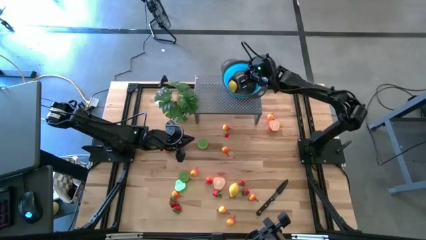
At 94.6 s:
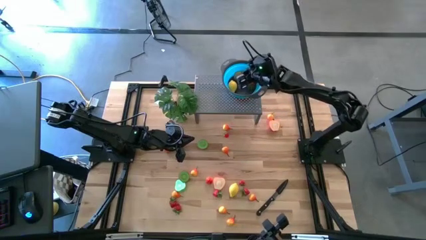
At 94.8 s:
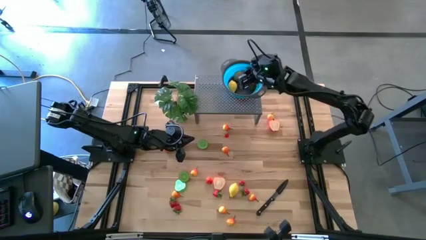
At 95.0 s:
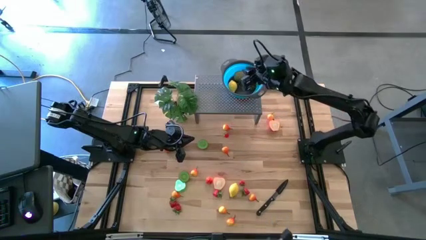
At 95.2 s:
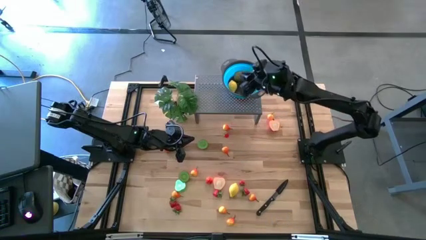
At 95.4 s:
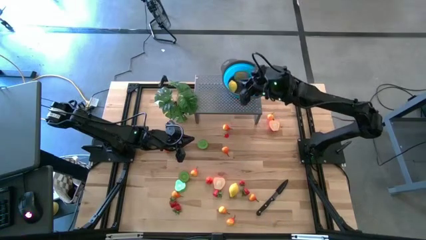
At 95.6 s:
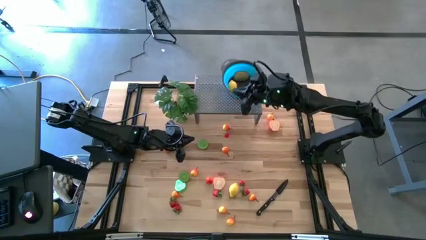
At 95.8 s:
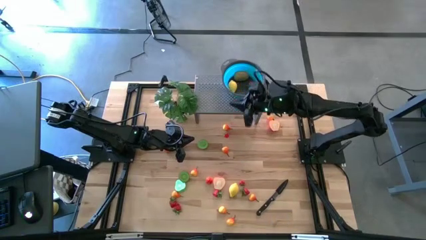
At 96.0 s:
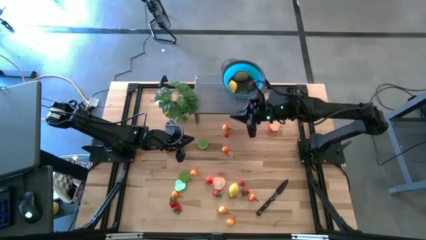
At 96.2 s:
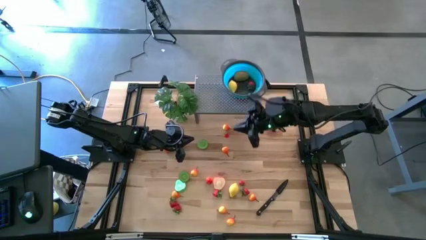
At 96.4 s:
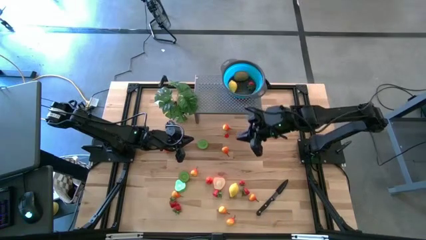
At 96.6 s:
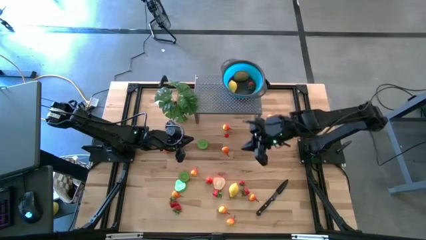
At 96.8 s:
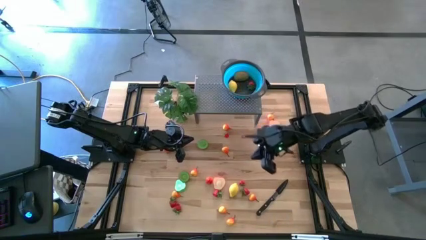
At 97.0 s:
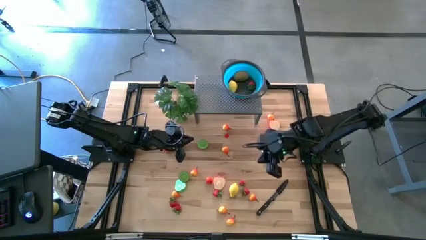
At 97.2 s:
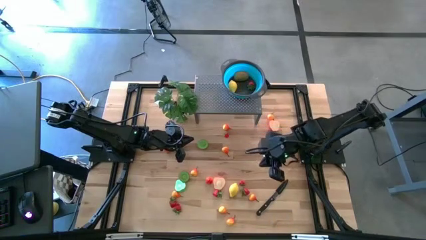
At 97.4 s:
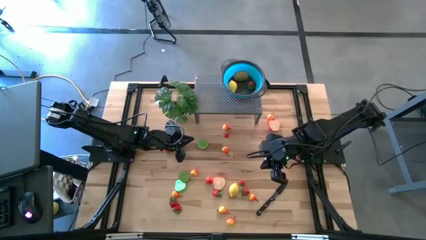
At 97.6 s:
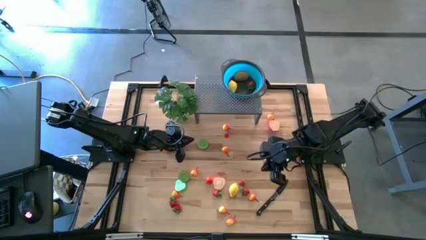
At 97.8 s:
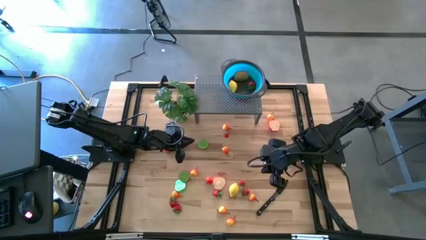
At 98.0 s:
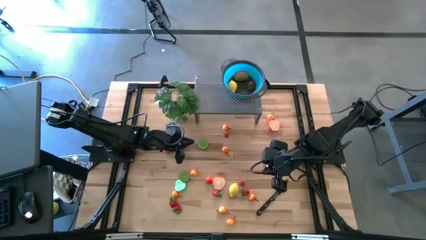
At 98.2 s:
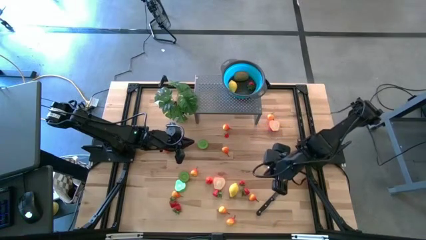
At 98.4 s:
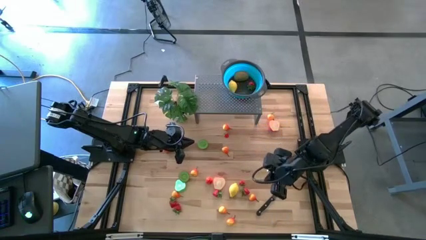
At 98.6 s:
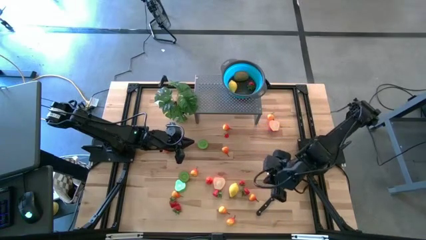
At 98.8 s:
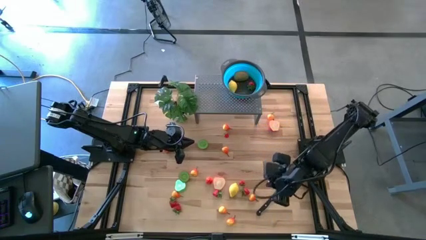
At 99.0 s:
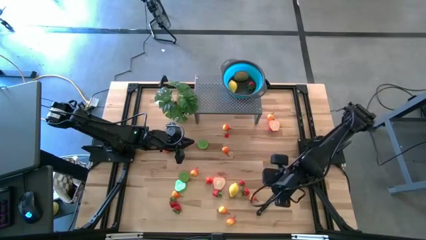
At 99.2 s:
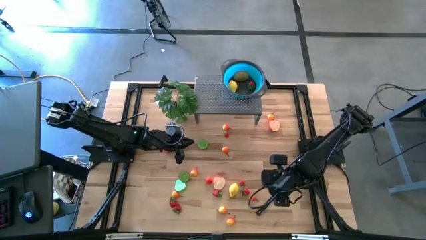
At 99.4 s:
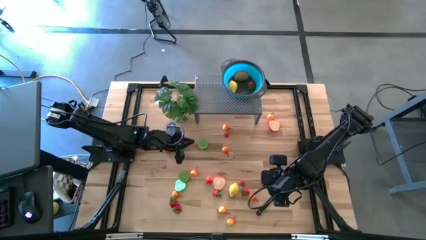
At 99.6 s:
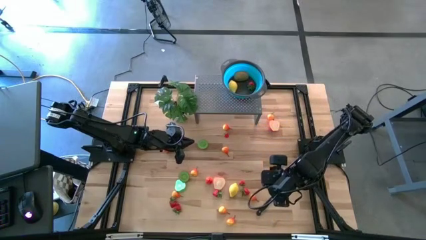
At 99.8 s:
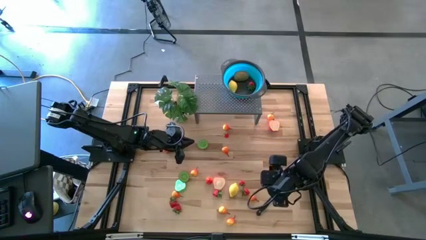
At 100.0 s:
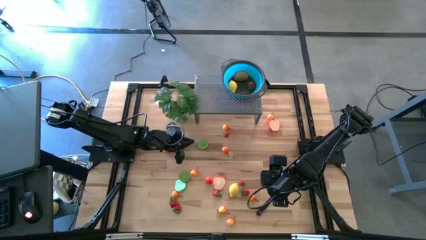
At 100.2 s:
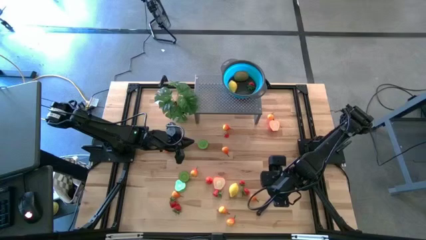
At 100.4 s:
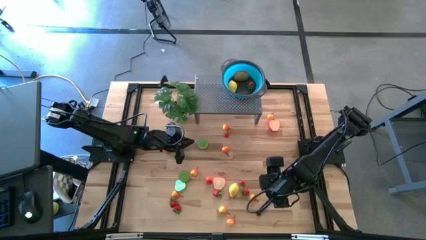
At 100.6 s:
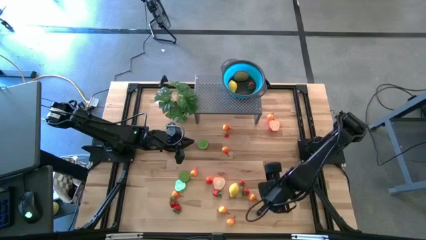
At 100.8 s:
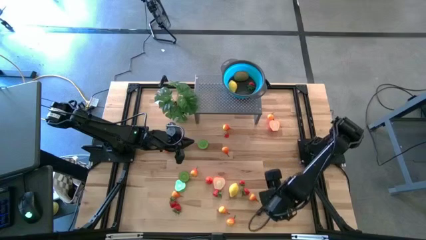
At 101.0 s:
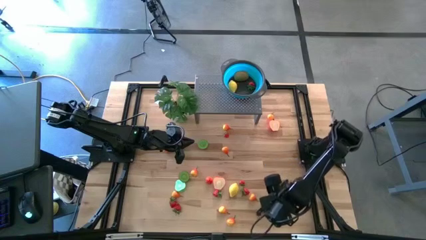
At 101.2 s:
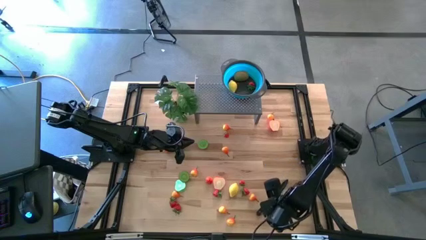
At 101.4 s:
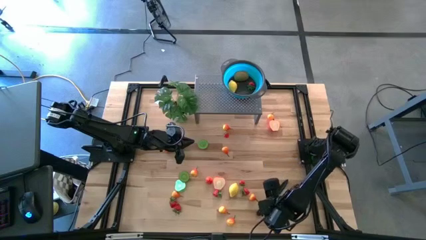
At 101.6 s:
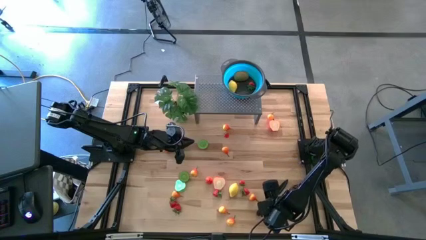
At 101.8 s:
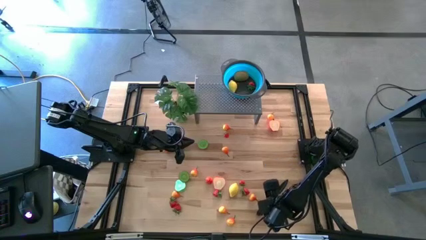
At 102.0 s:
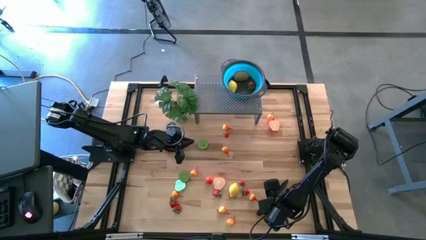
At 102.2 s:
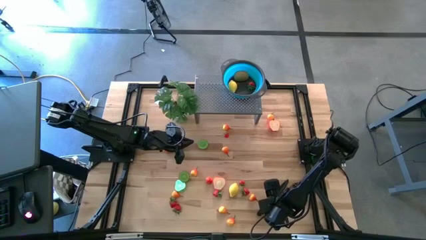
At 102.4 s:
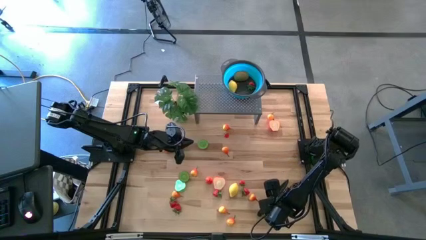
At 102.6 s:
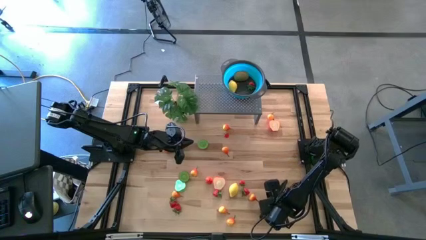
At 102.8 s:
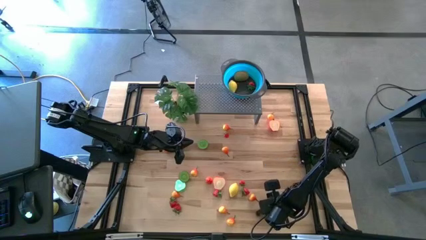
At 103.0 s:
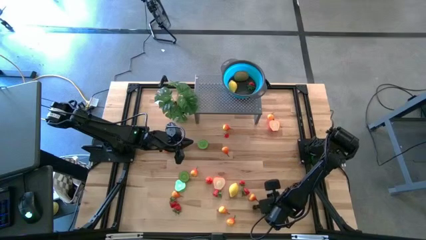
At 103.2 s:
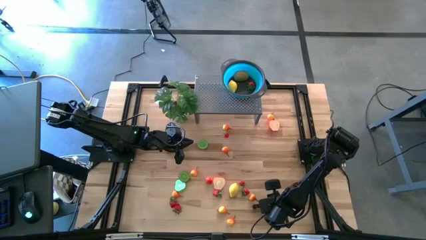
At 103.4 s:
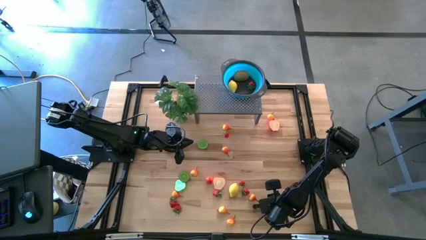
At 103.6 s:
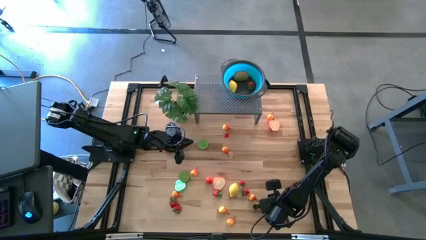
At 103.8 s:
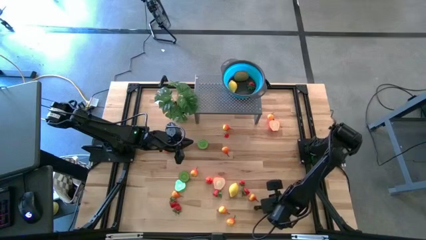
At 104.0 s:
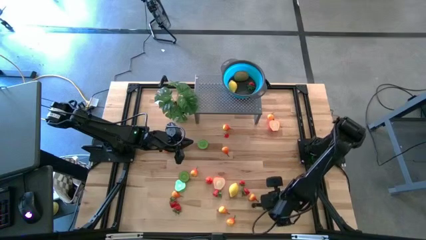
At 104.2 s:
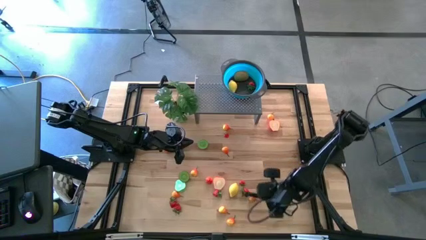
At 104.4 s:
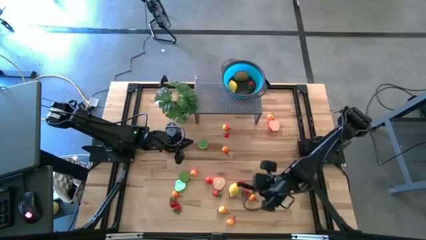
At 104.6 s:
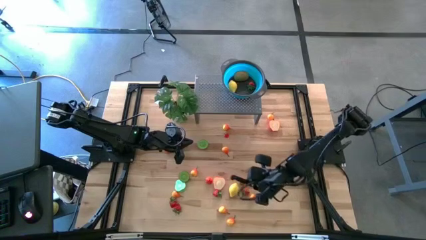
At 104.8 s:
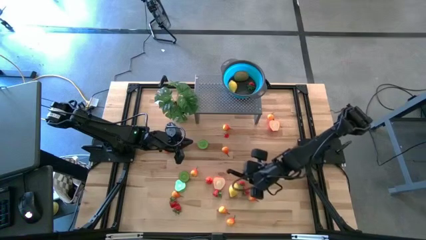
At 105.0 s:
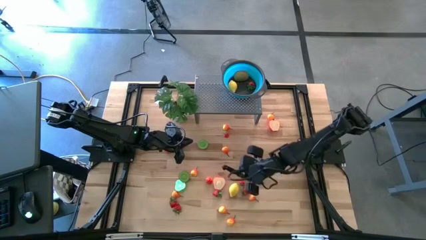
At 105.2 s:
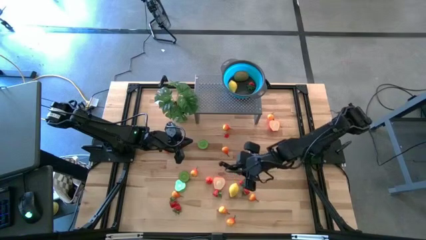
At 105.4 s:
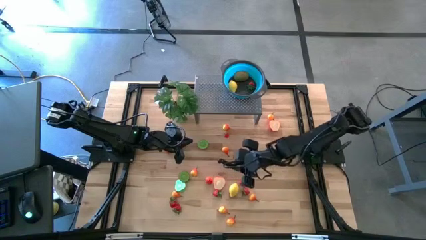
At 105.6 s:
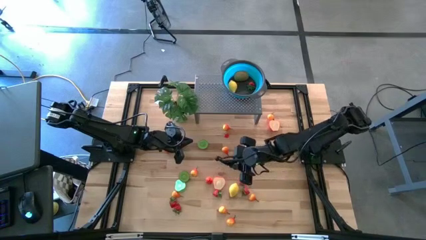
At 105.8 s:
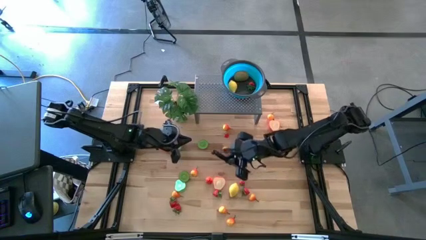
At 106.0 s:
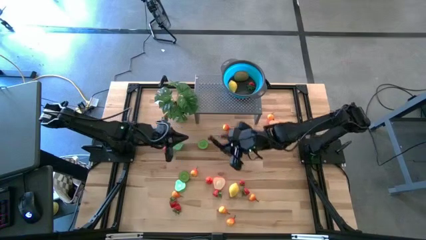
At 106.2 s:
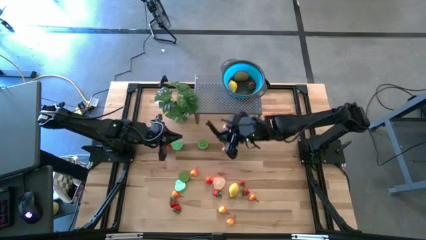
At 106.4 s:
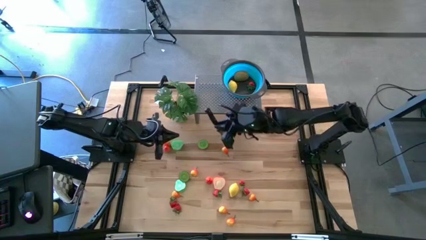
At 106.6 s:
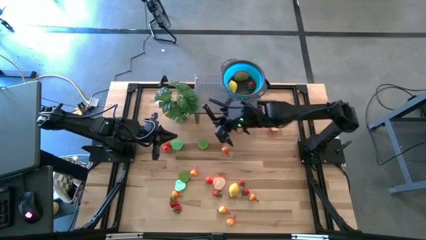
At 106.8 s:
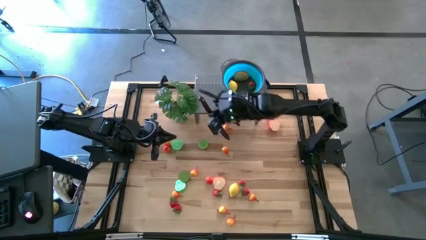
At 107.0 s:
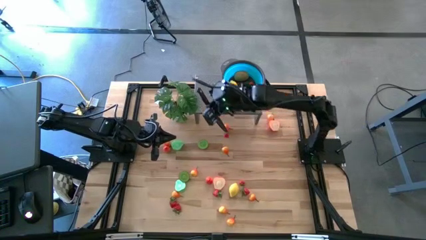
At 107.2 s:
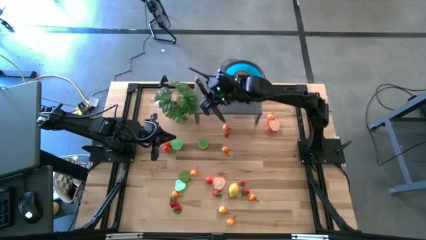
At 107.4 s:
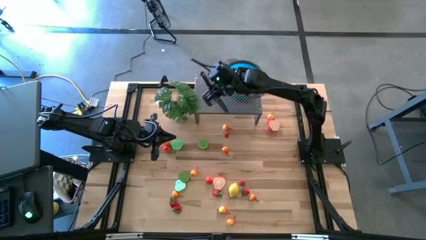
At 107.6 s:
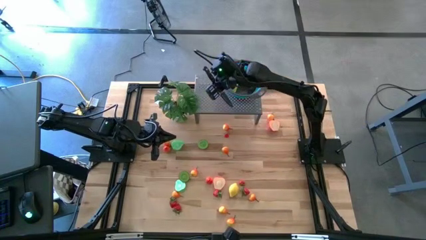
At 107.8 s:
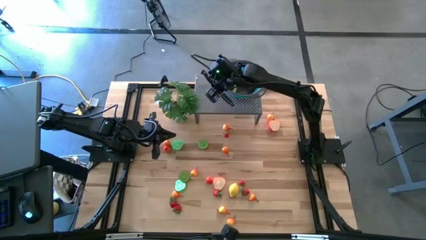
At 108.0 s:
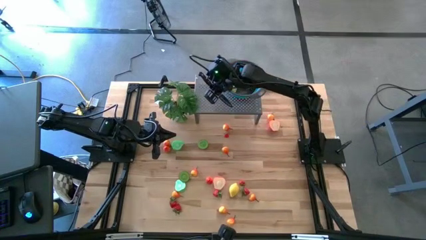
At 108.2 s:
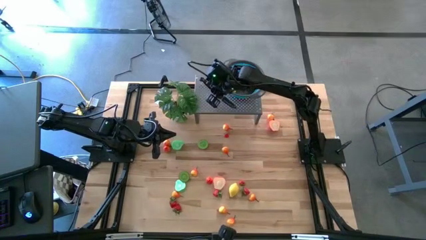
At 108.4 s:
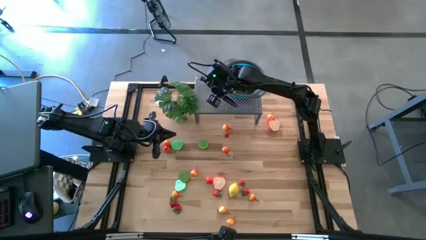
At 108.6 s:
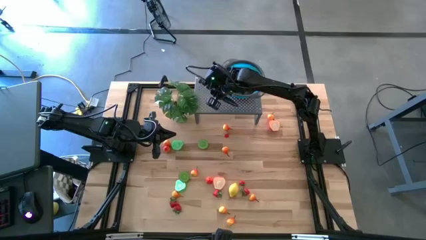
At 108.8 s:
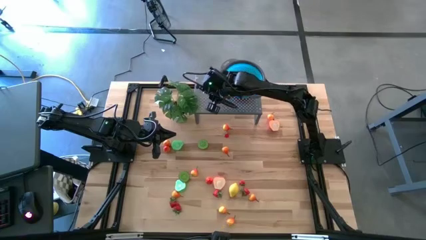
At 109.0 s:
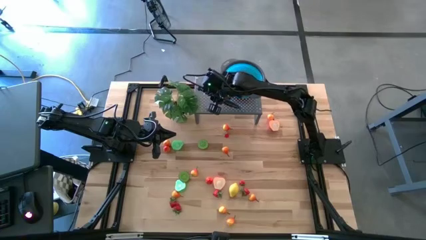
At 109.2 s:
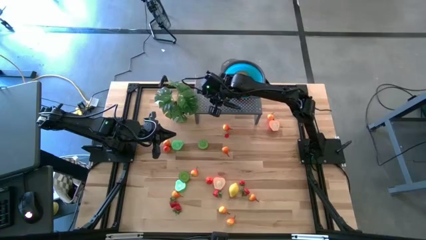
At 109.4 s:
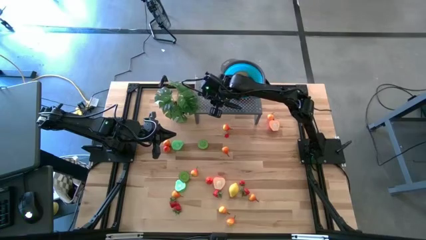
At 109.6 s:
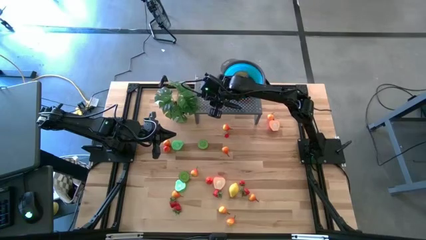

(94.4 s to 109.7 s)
Task: Pick & Place Fruit
Put the black knife on the shelf

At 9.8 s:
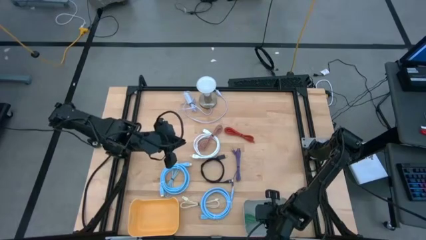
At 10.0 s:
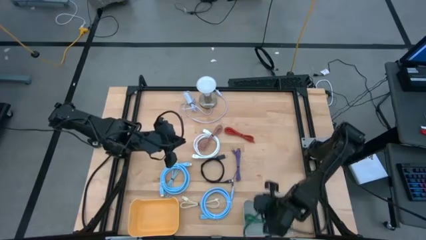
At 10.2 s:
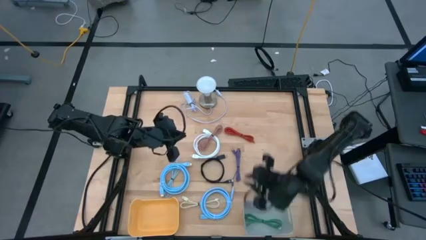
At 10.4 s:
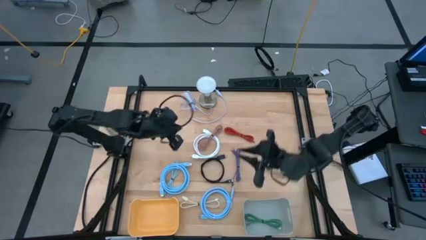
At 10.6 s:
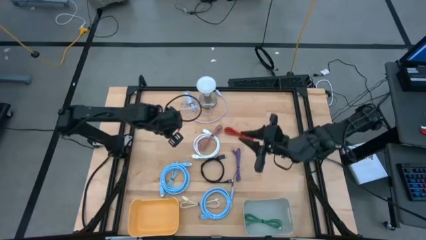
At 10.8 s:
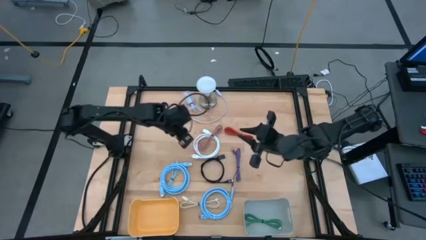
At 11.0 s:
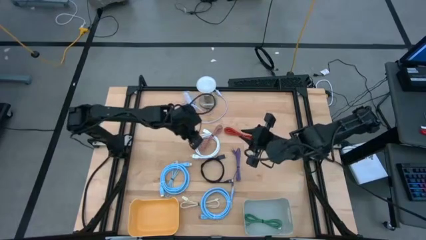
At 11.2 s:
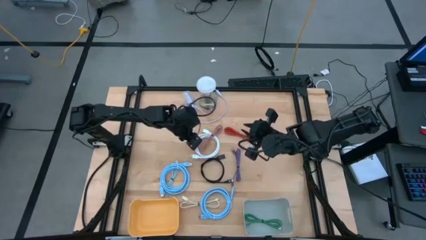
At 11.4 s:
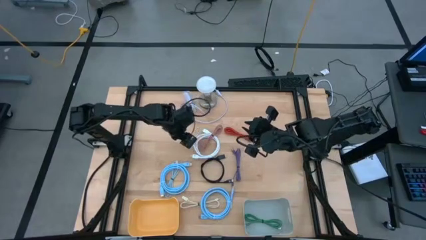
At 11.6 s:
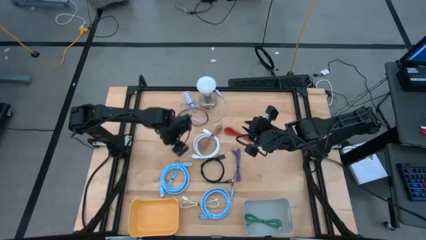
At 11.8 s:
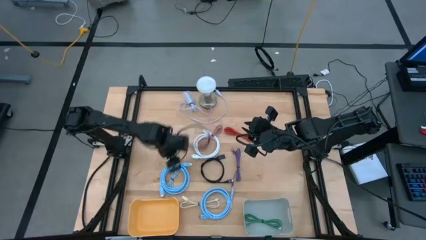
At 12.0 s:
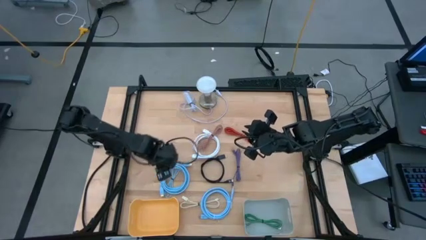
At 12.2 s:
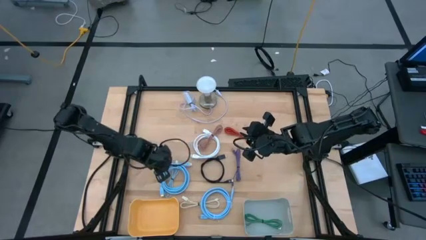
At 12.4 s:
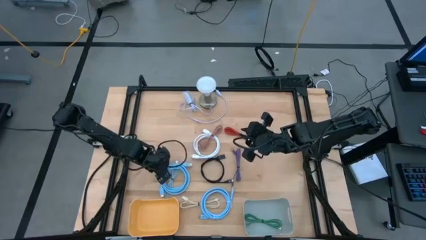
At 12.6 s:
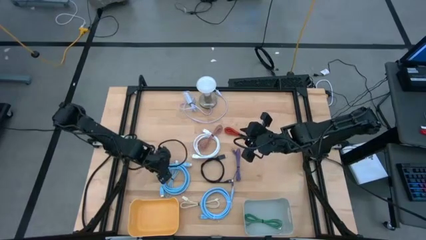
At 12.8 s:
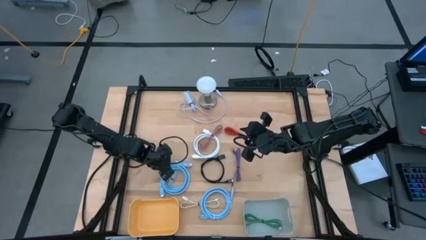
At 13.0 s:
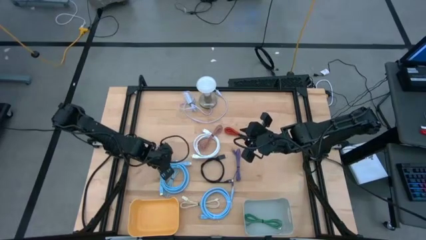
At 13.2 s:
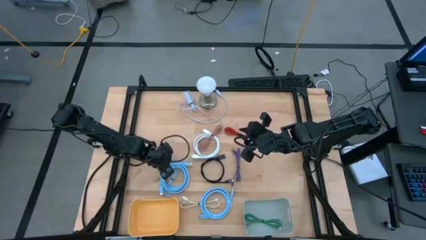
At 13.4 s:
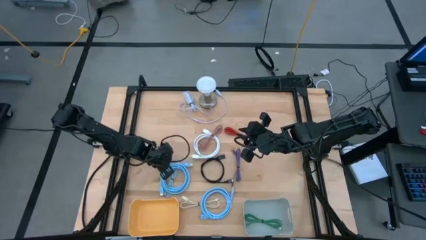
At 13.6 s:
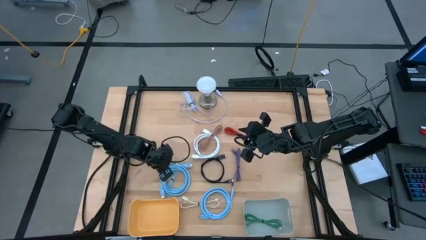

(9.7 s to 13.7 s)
Task: Pick & Place USB Port
Put the left blue HDMI cable into the orange bin
